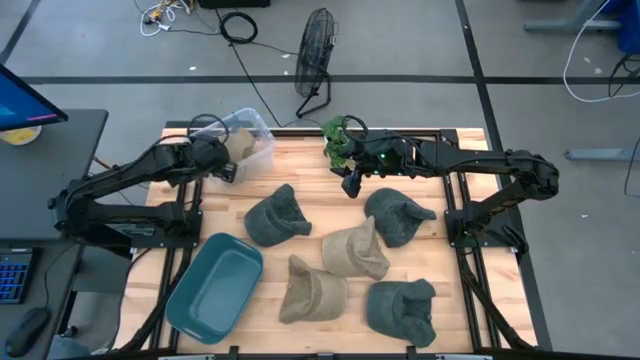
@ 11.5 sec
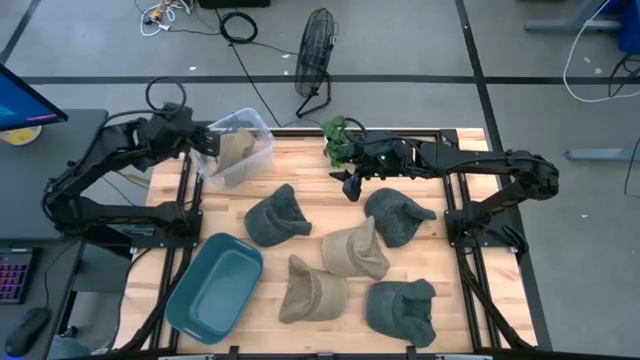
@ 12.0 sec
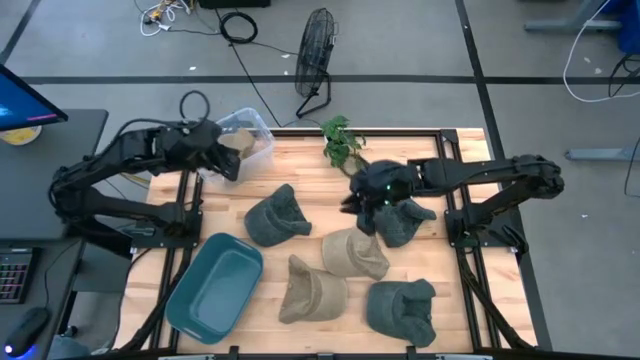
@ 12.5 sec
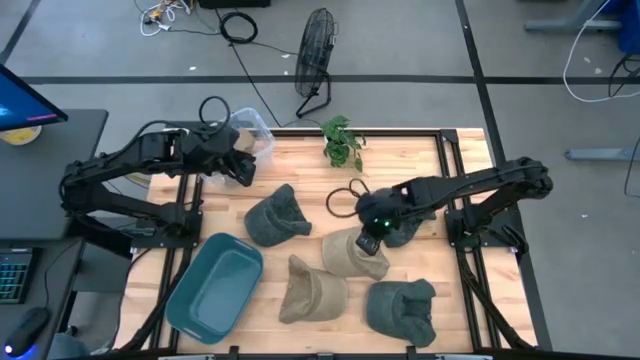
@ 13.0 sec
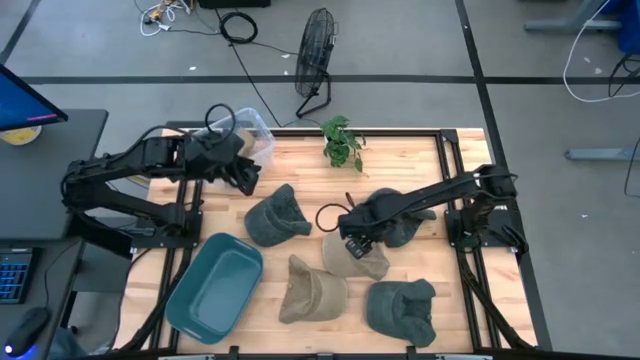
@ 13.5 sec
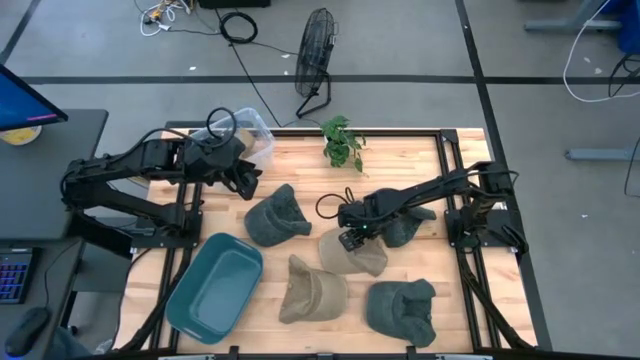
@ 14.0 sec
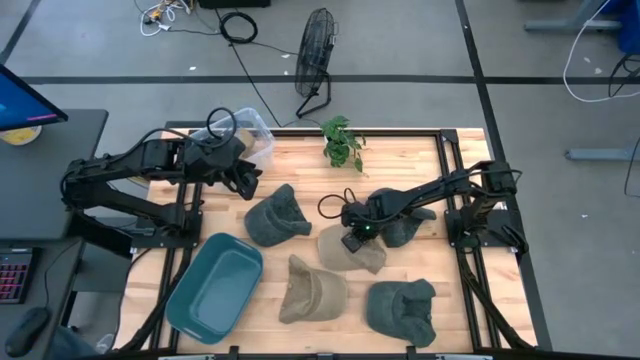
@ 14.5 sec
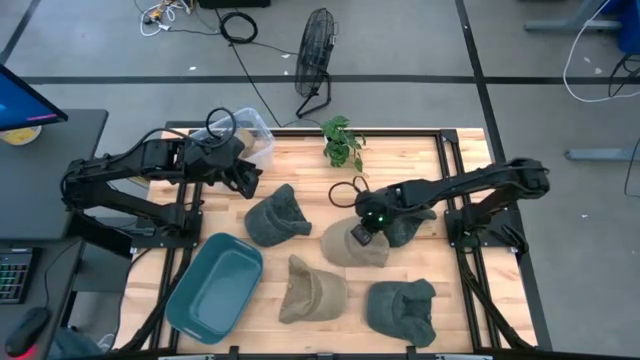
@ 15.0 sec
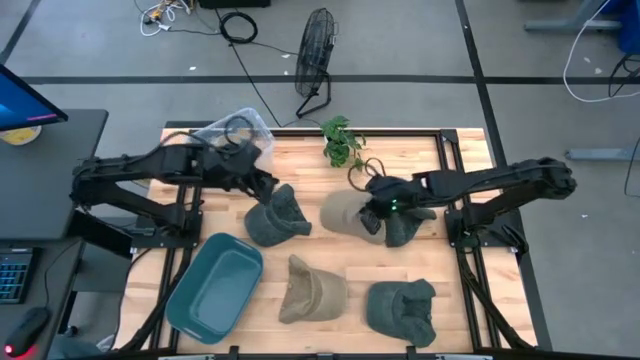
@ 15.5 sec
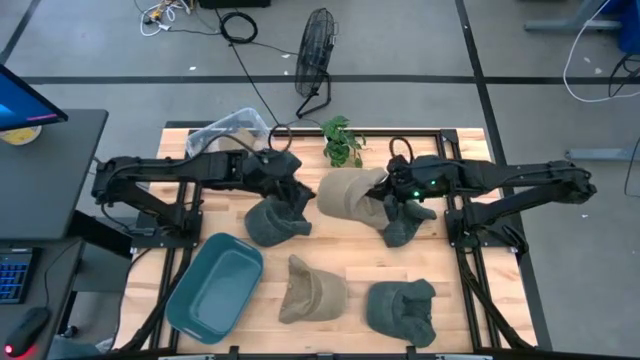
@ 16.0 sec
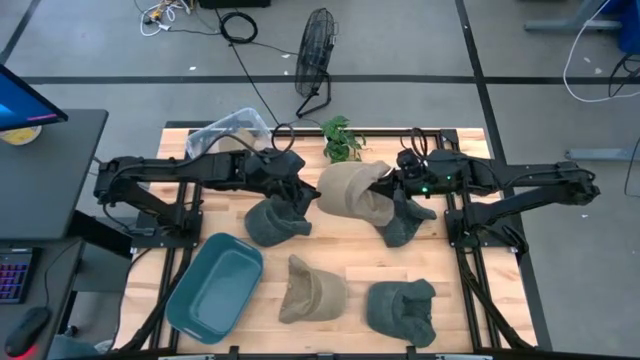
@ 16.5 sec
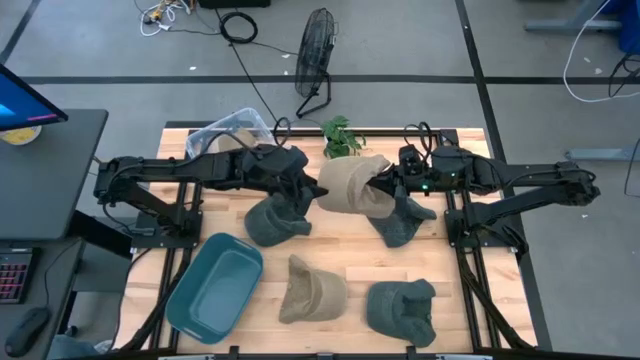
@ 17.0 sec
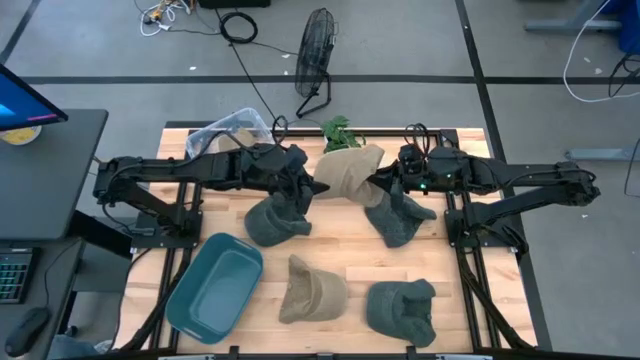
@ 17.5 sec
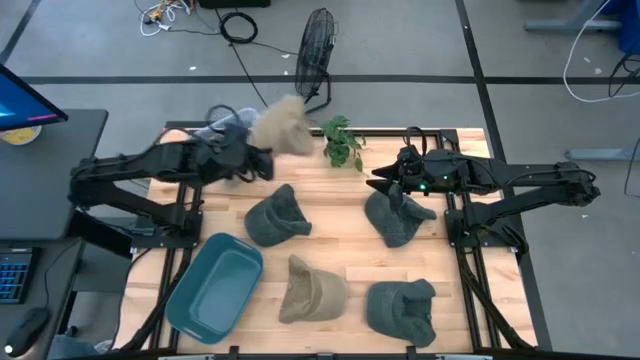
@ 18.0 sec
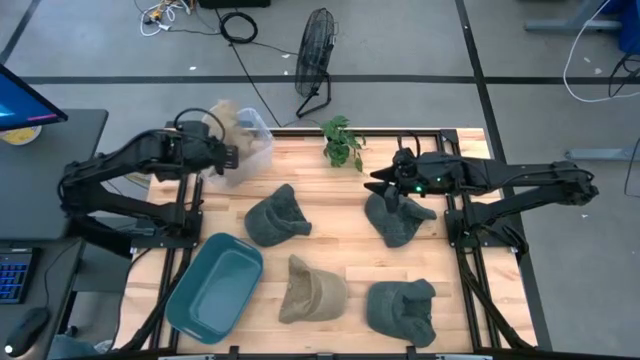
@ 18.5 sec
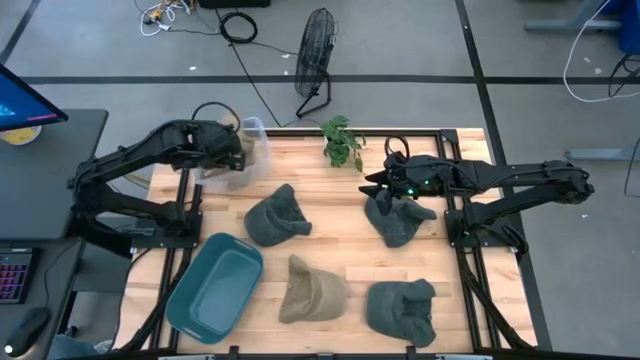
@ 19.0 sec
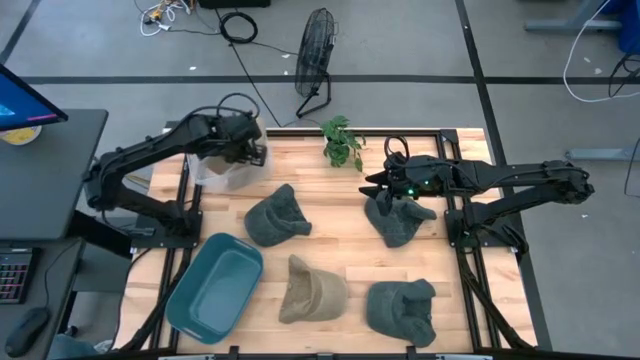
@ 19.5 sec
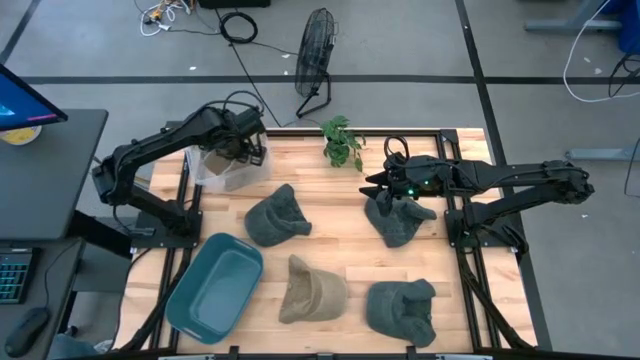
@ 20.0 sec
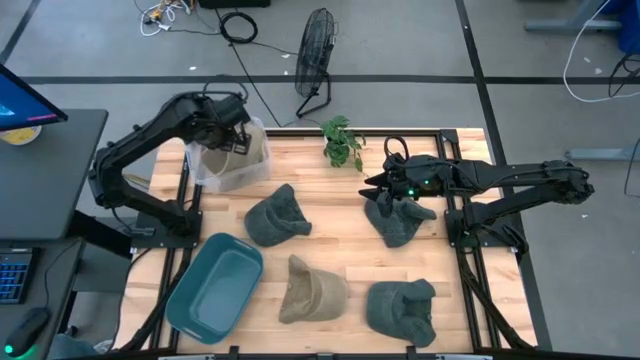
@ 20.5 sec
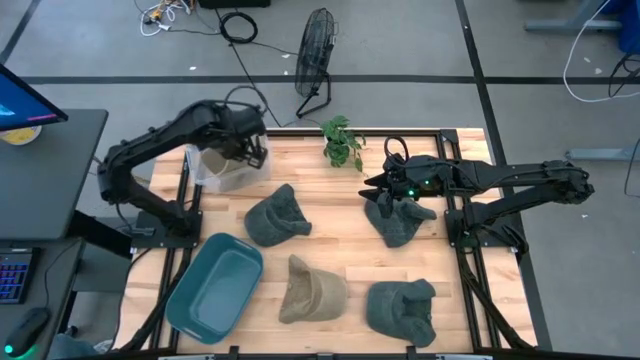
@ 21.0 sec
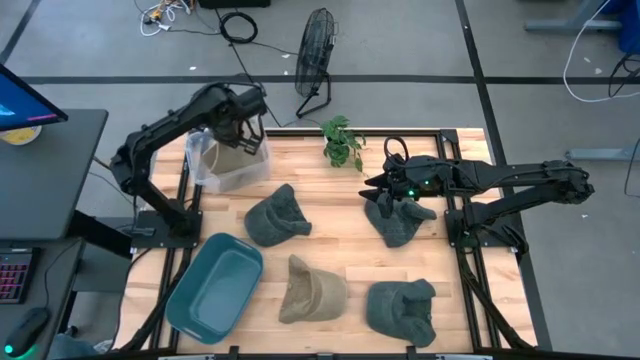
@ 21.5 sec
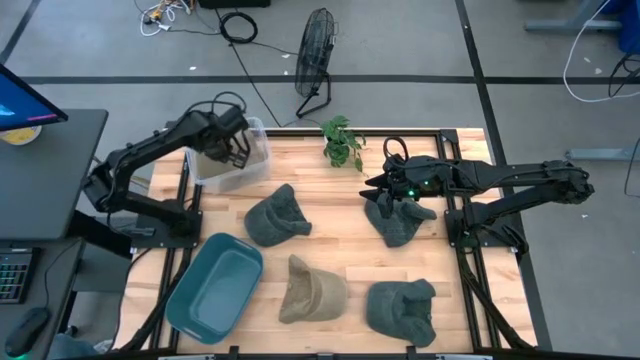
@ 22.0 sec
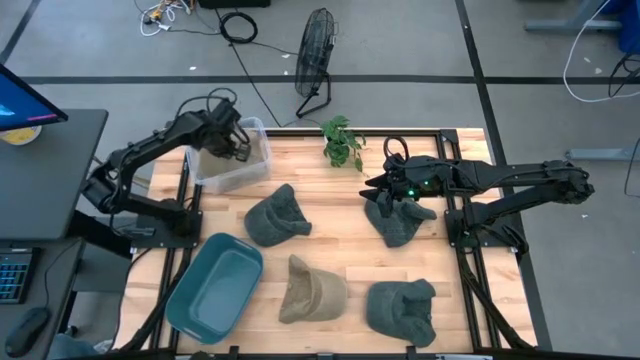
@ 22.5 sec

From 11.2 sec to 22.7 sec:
Task: Pick & Place hat
Put the top brown cap into the transparent bin

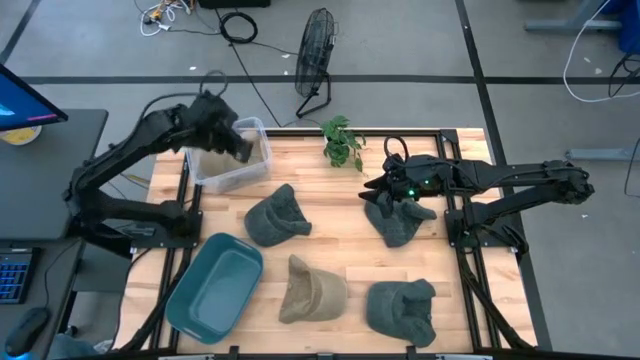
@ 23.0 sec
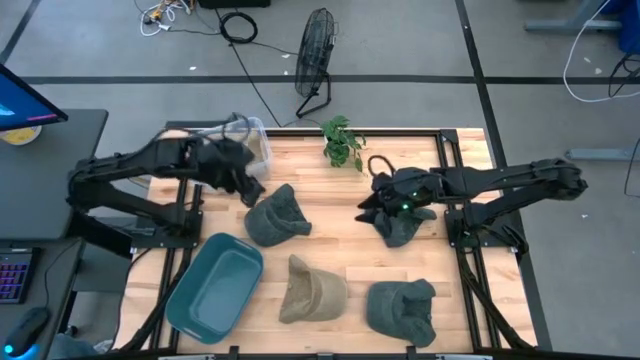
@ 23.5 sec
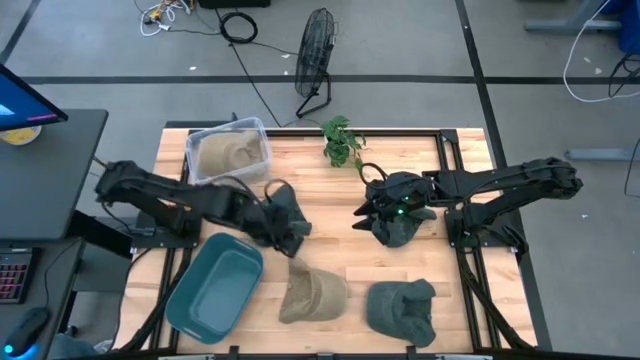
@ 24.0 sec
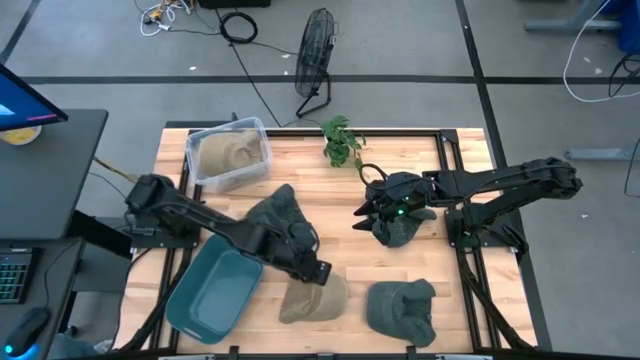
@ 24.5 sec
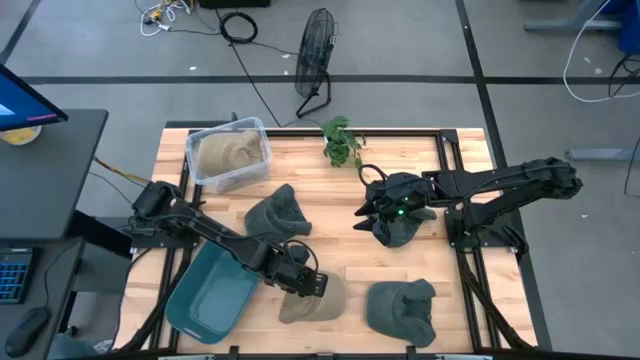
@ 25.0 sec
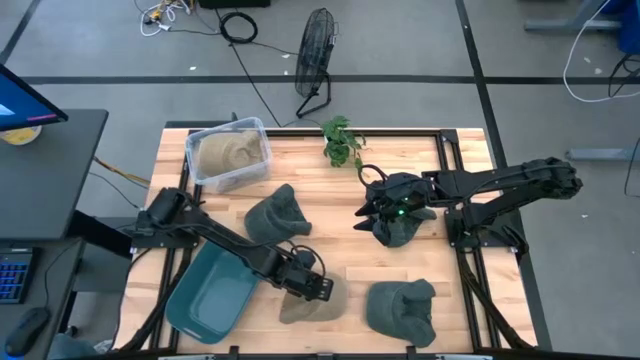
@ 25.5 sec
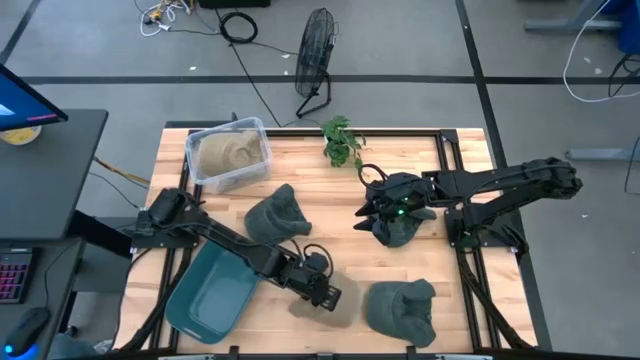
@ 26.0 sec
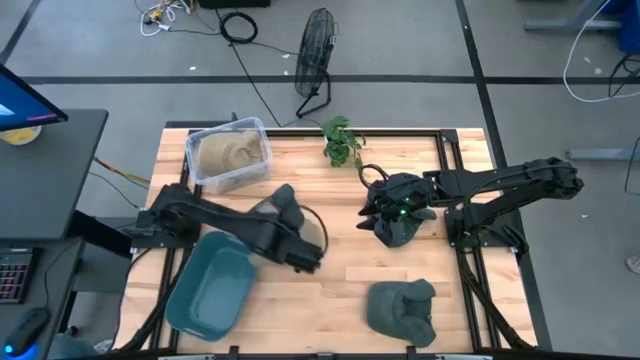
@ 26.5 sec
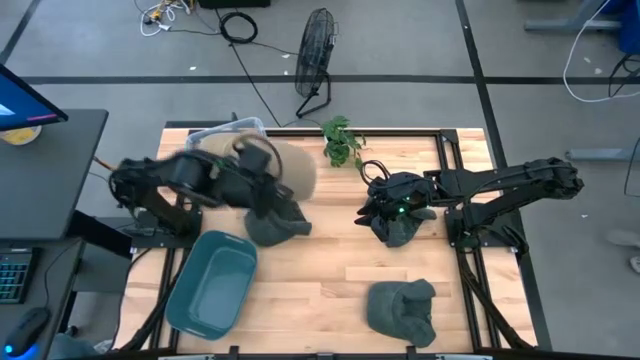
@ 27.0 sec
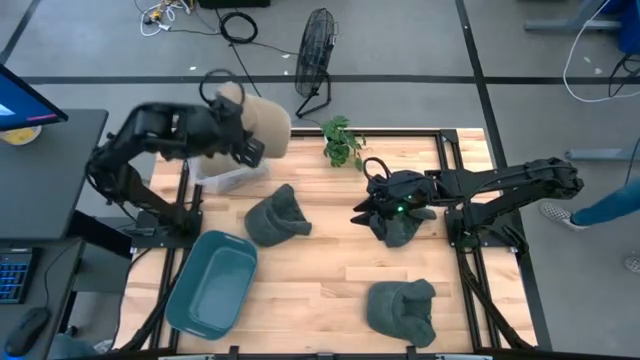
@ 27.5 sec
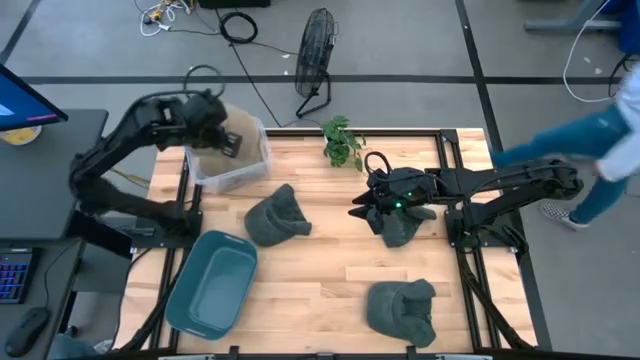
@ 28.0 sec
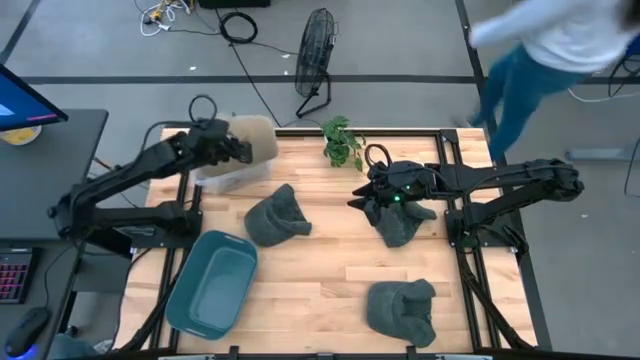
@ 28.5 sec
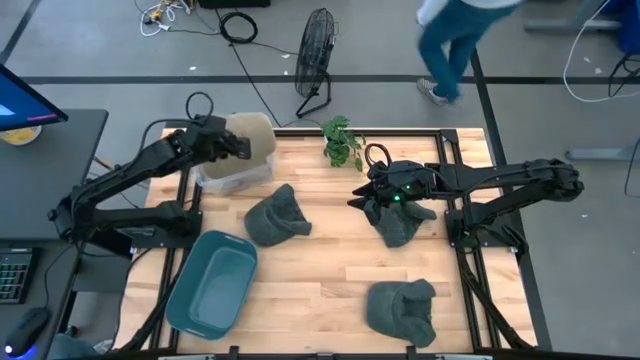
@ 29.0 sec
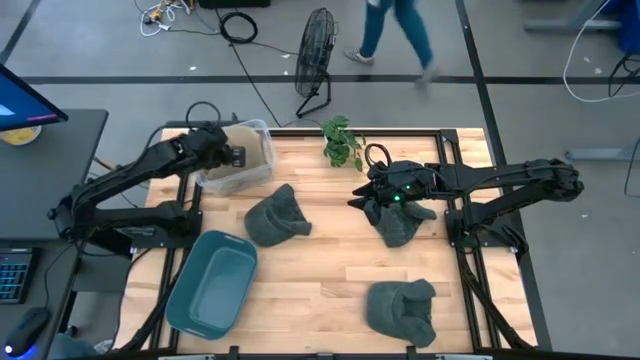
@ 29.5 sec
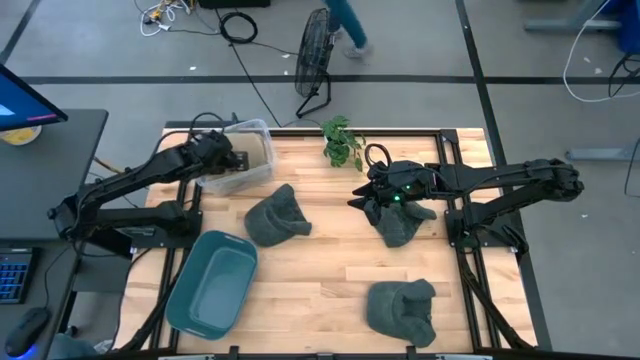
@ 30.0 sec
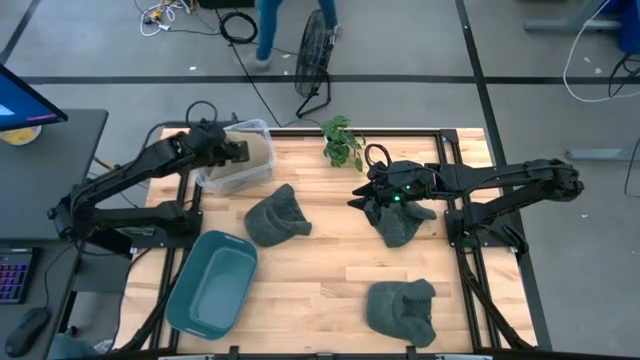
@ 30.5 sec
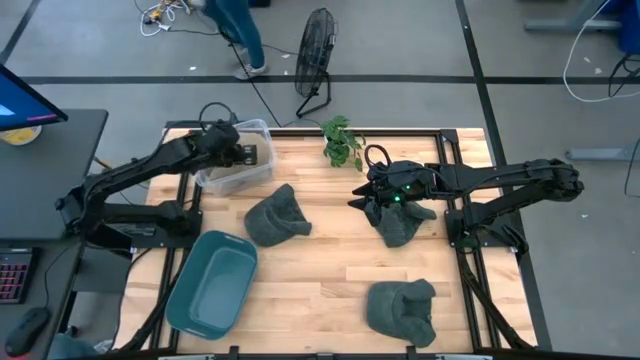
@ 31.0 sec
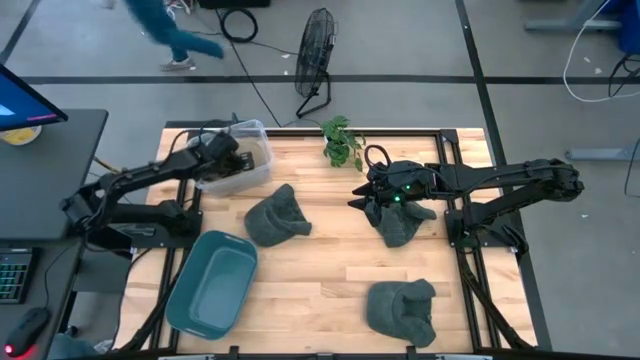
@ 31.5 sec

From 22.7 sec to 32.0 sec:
Put the brown cap into the transparent bin

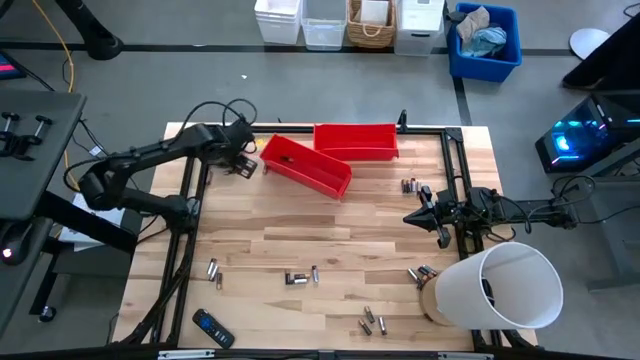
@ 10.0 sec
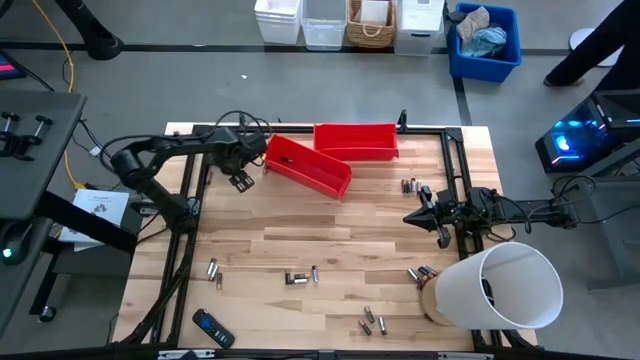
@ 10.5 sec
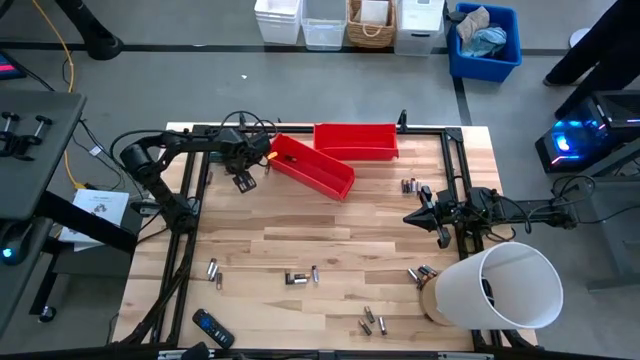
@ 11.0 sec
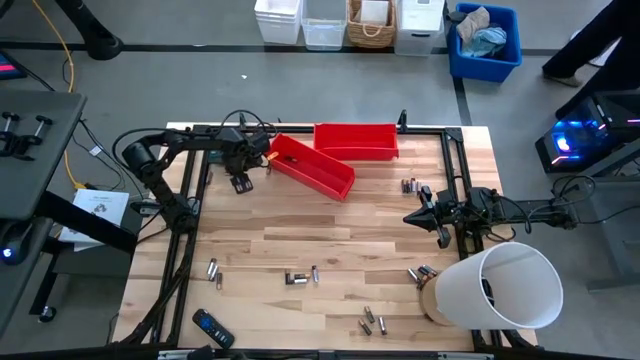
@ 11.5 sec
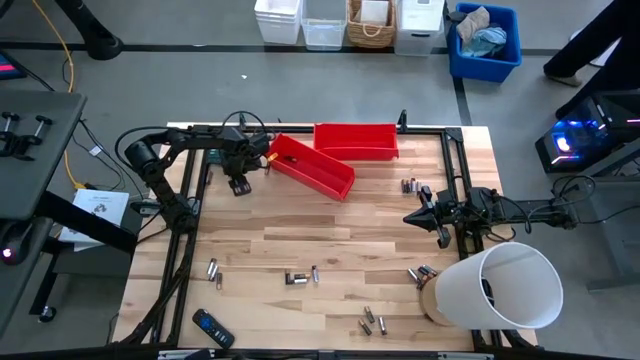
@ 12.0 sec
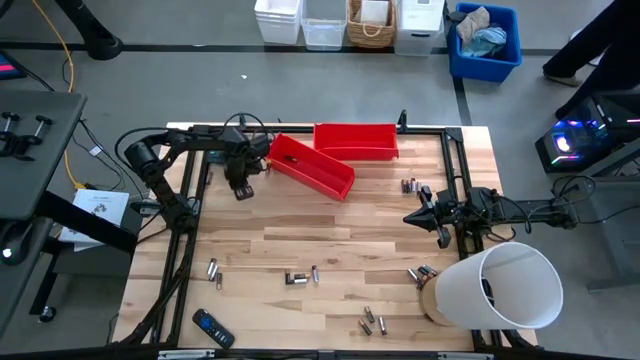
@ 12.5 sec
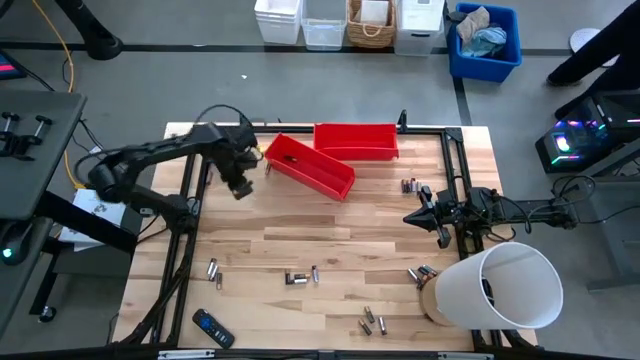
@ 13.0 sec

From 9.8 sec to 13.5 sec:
Task: Sort batteries
Put the black battery into the bottom red bin
